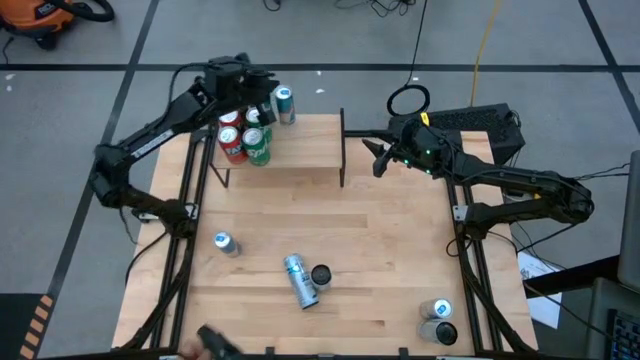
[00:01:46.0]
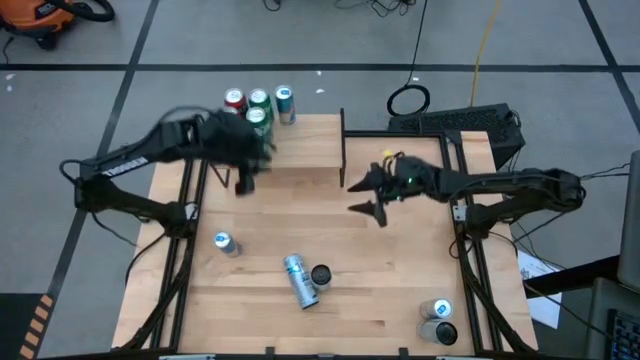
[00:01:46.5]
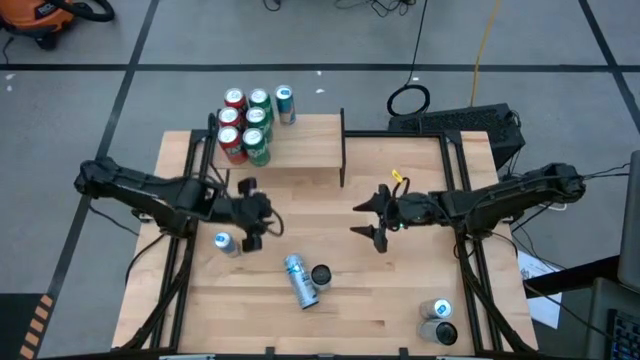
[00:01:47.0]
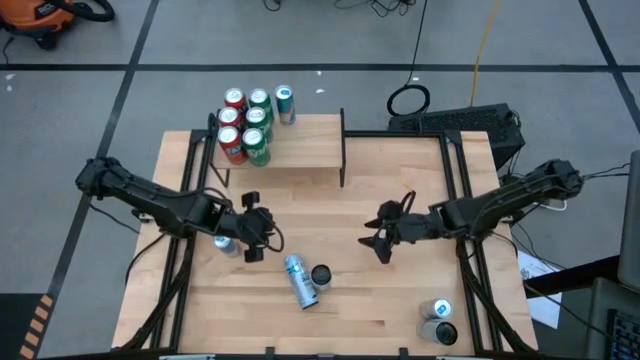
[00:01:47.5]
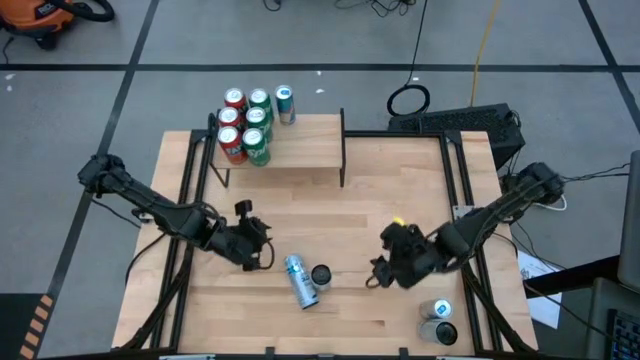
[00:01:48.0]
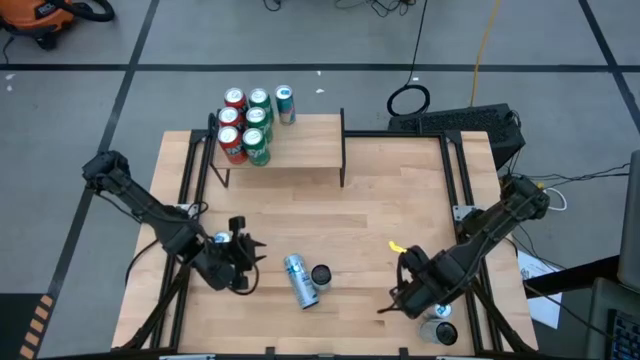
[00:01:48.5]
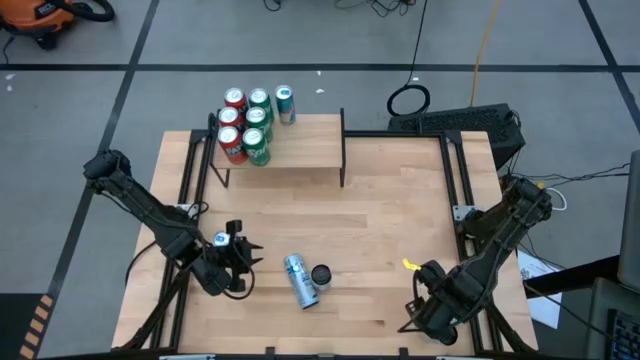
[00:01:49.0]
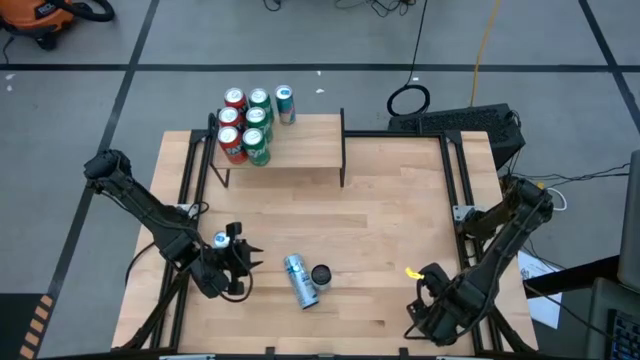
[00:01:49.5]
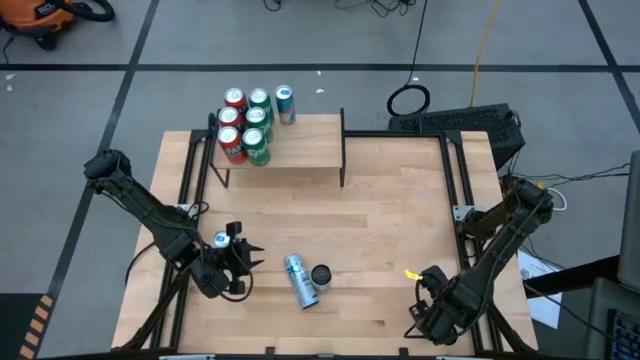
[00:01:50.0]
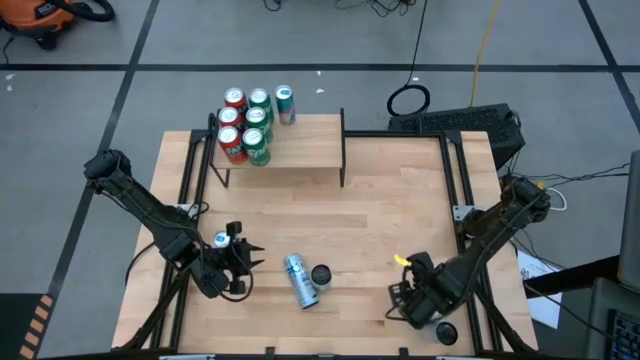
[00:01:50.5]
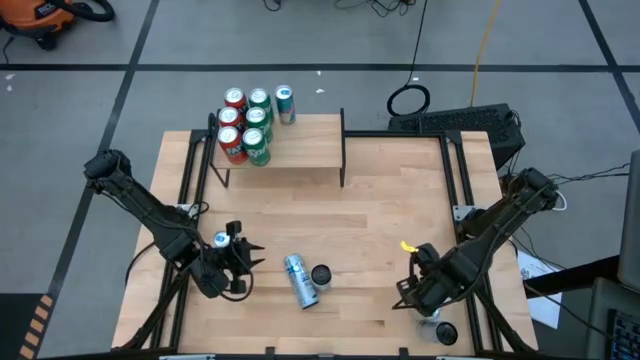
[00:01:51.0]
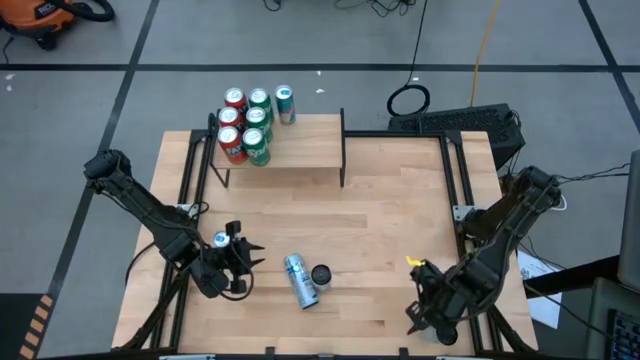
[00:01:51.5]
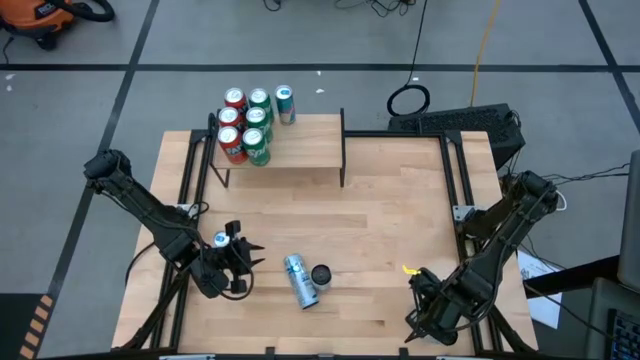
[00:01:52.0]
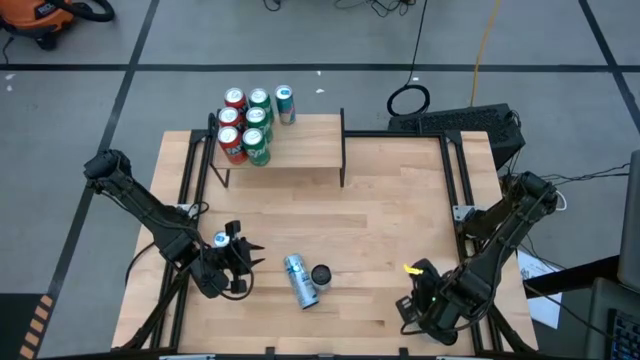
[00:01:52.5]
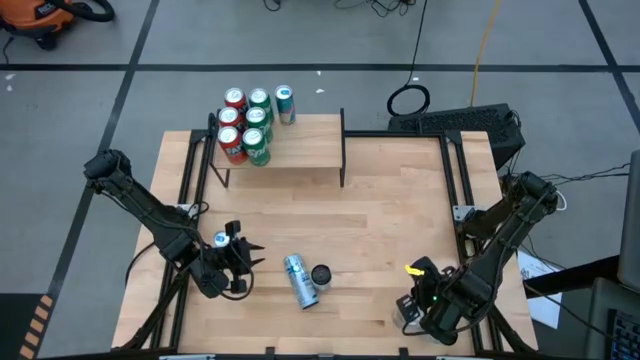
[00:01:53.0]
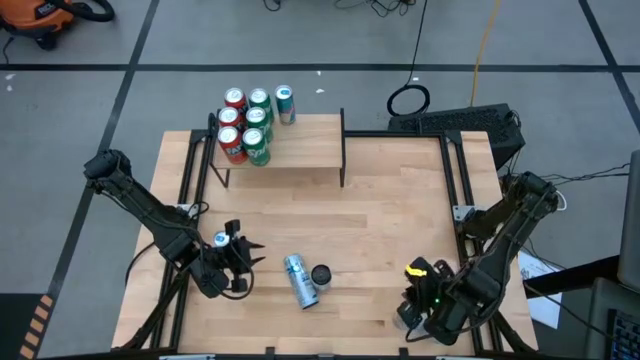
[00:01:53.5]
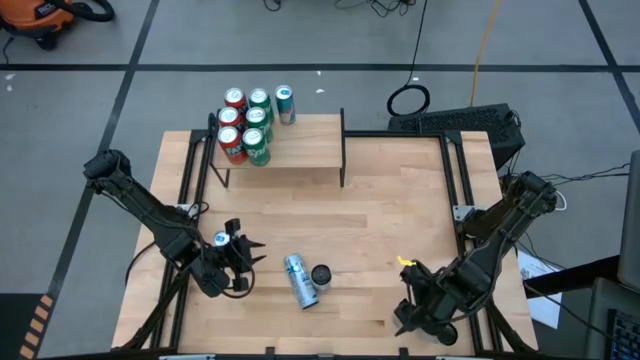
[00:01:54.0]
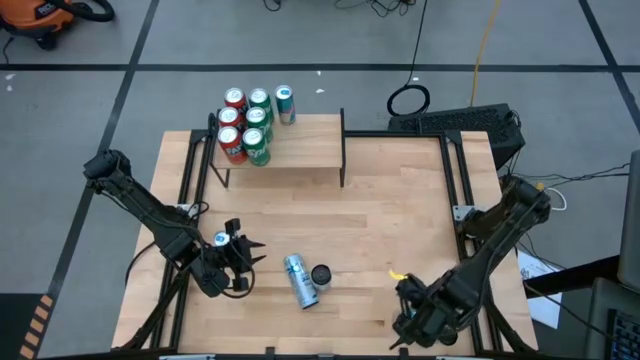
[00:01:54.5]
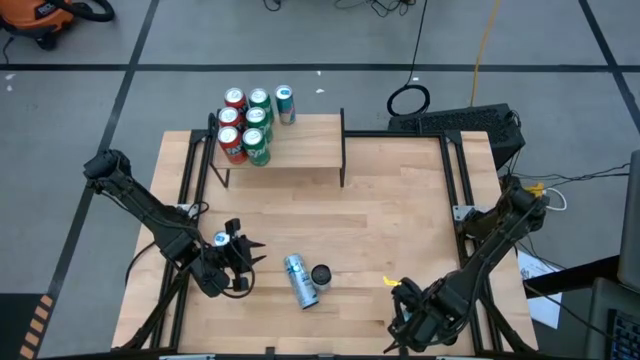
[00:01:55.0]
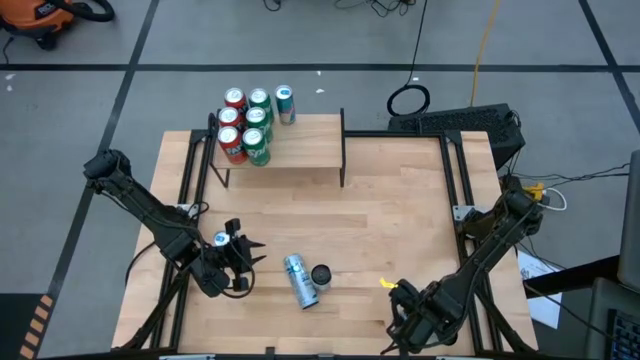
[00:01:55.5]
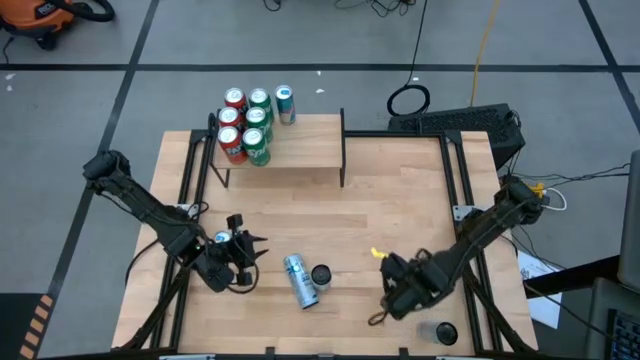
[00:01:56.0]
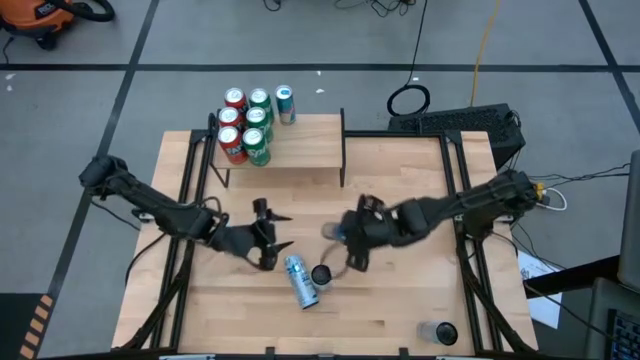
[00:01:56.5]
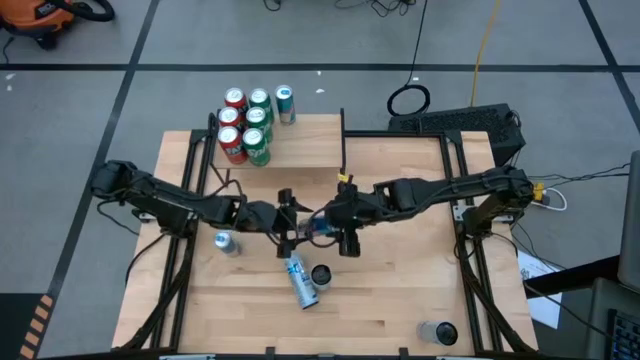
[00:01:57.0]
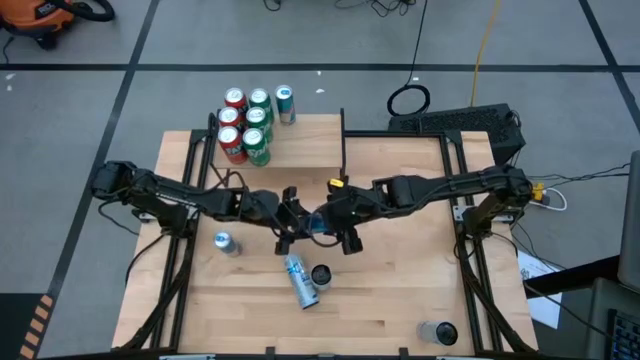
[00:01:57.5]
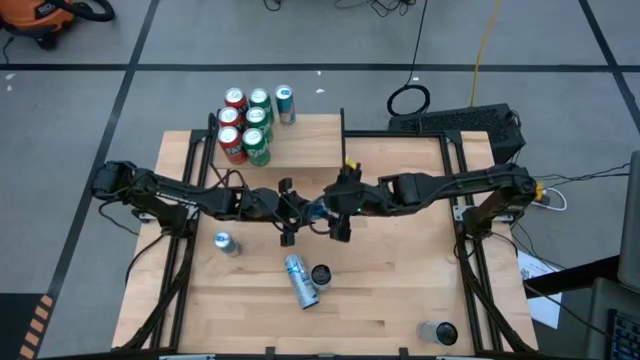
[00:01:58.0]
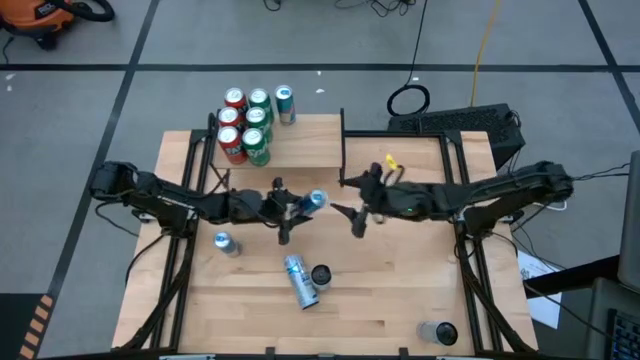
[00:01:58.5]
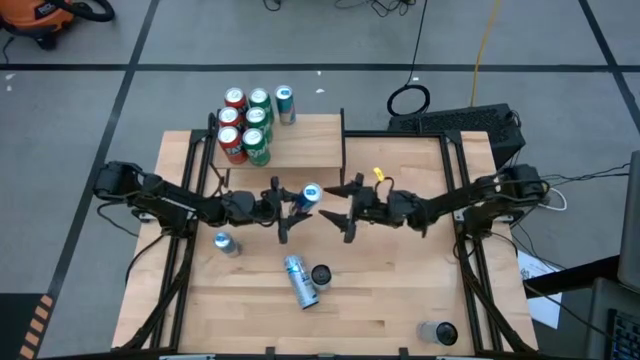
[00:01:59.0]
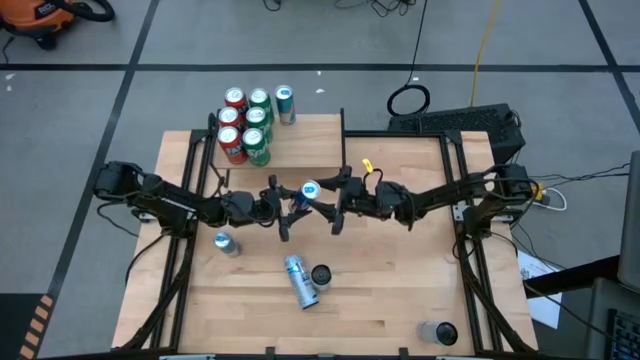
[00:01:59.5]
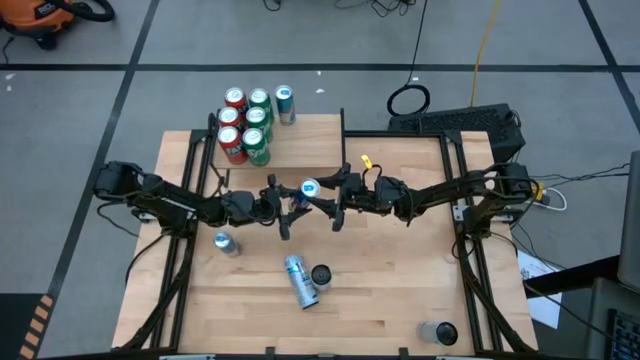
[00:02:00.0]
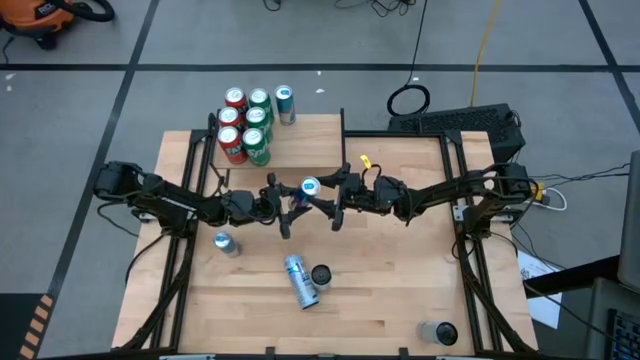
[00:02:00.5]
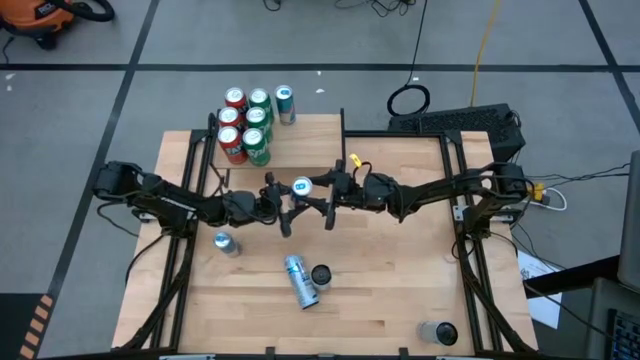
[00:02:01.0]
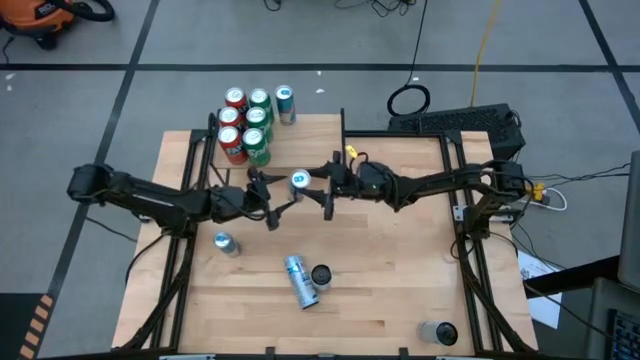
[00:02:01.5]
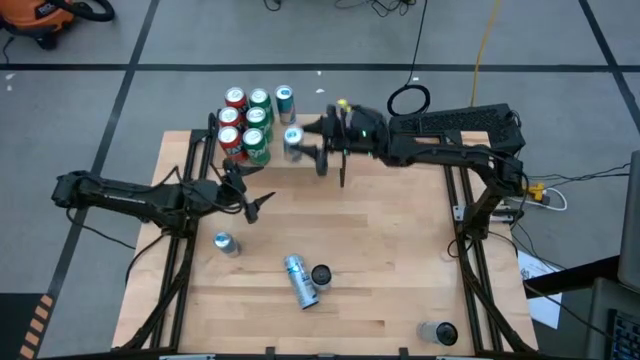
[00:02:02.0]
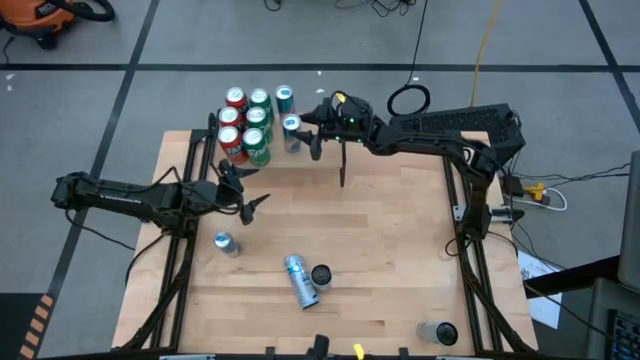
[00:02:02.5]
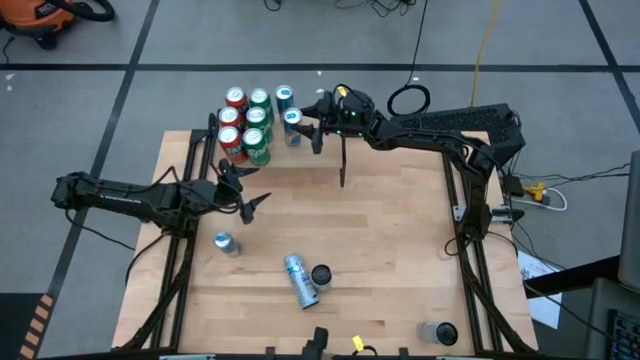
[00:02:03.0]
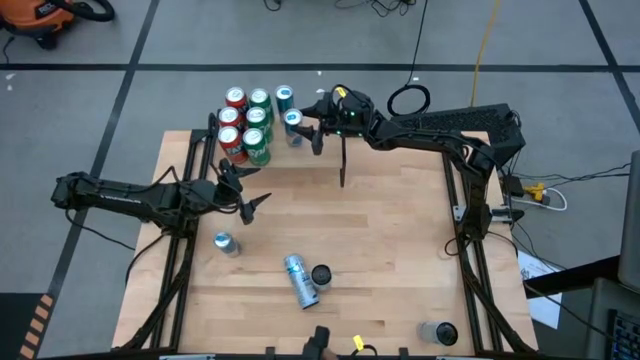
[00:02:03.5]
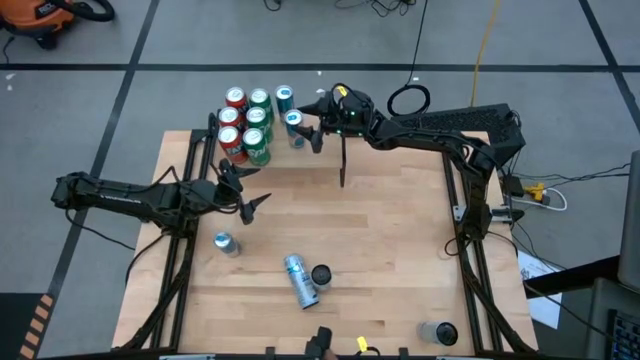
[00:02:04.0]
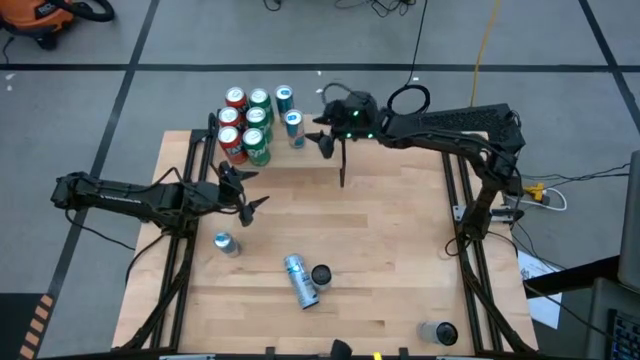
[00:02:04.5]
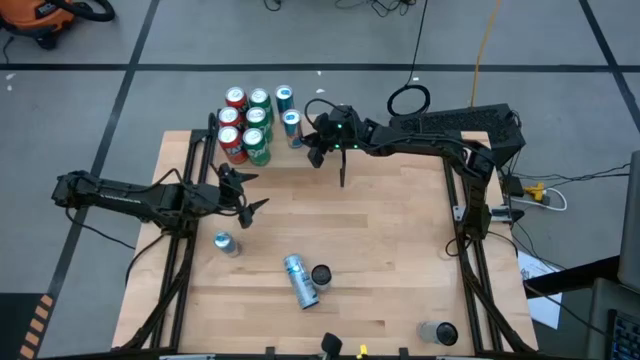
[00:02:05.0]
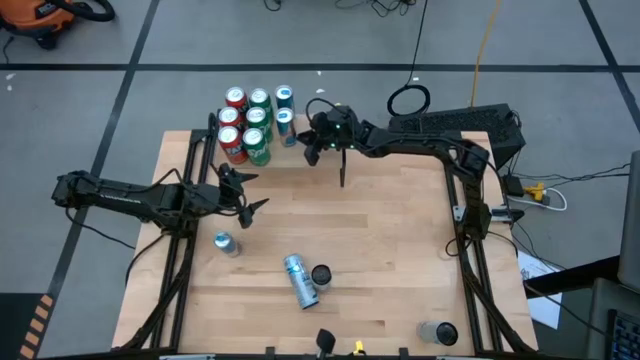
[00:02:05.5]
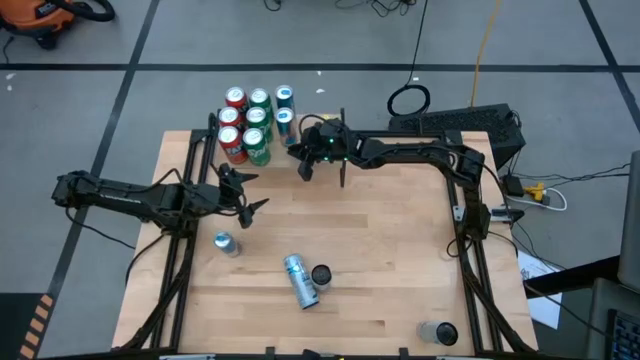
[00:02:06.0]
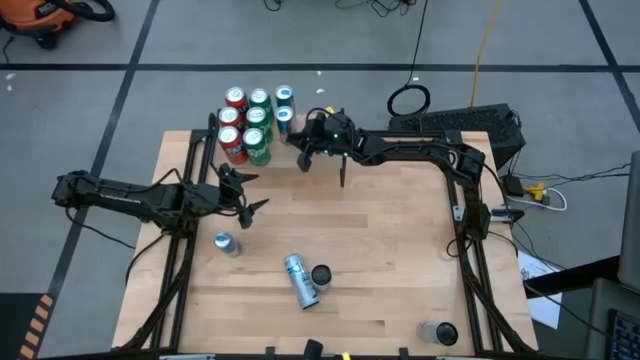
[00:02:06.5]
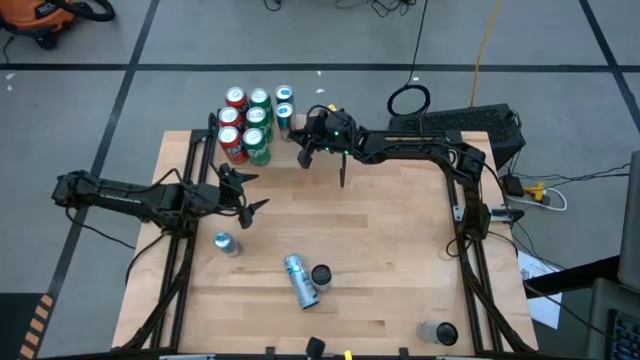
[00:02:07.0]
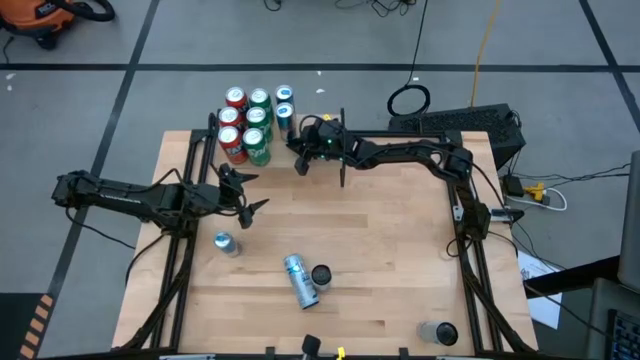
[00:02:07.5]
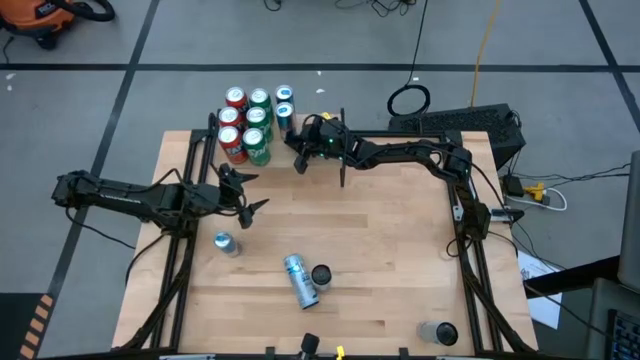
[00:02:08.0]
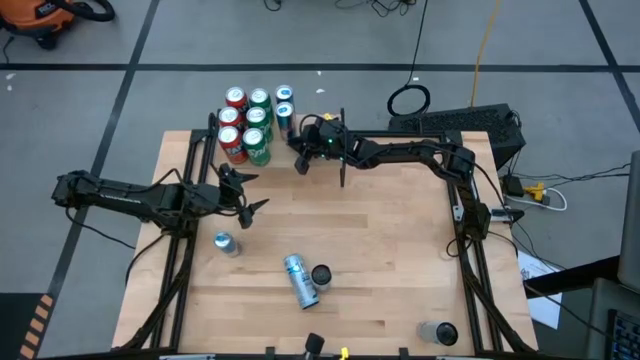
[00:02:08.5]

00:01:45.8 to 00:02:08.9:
Task: Place canned beverage on shelf
Put the right blue soda can on the shelf
